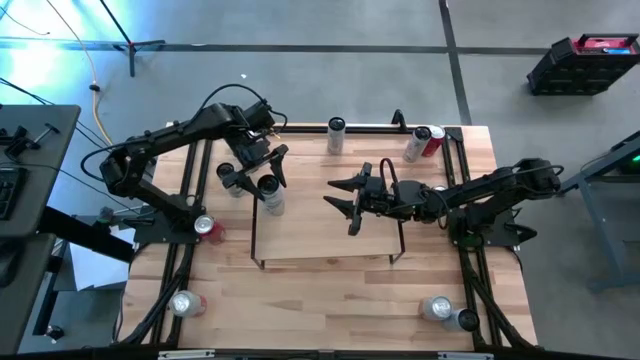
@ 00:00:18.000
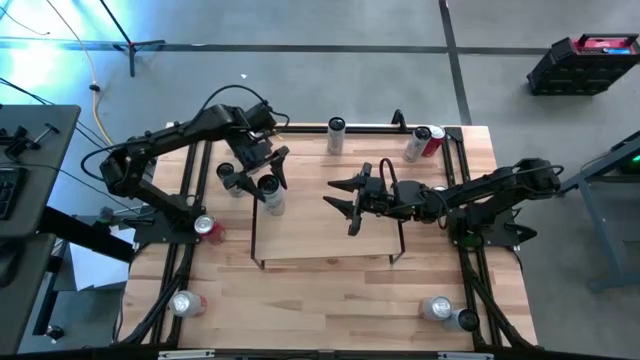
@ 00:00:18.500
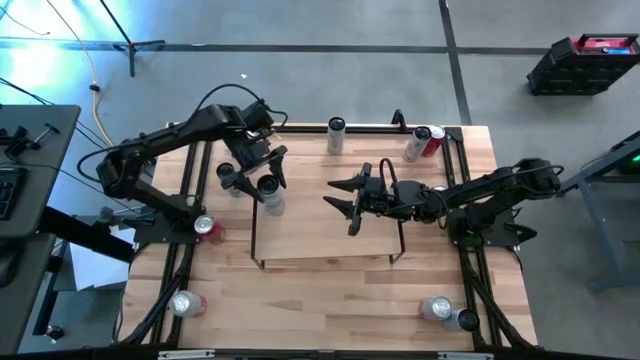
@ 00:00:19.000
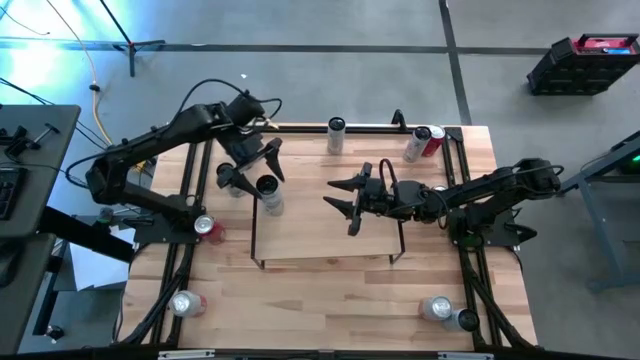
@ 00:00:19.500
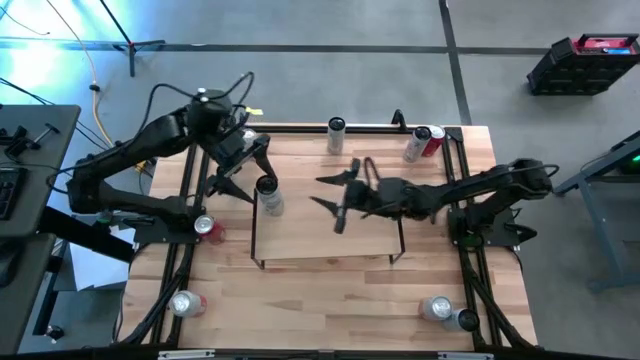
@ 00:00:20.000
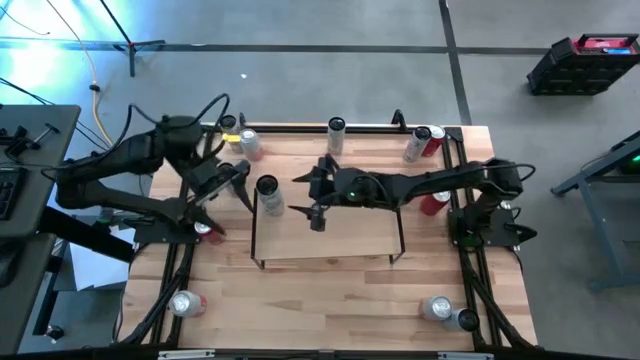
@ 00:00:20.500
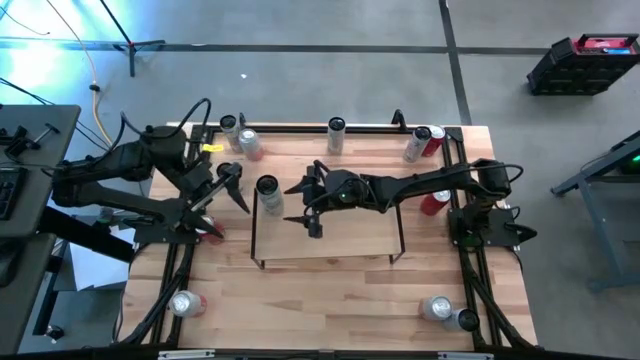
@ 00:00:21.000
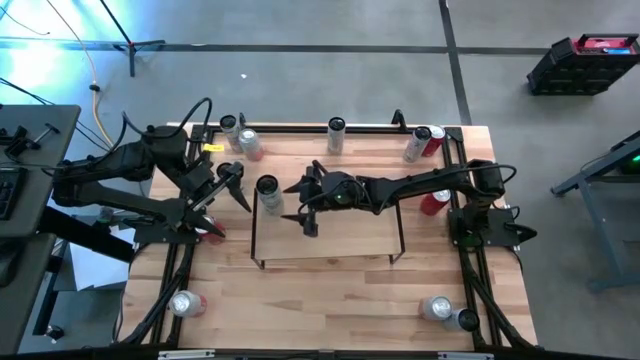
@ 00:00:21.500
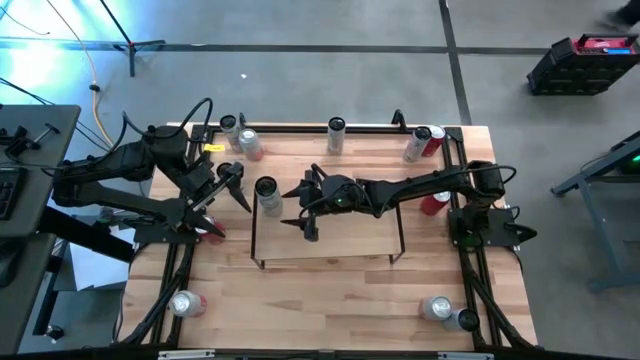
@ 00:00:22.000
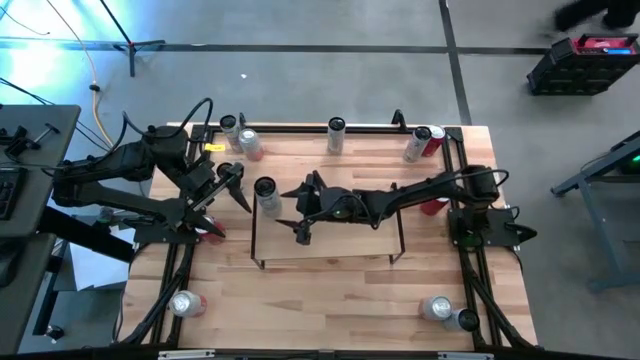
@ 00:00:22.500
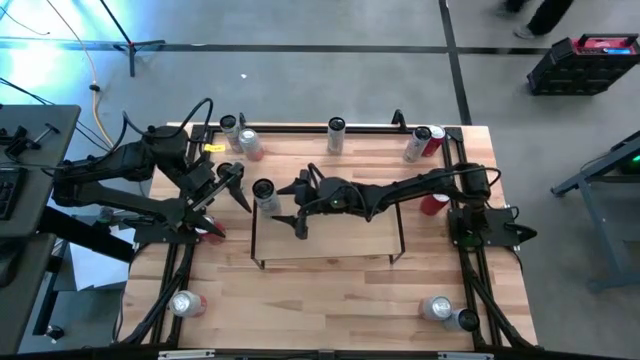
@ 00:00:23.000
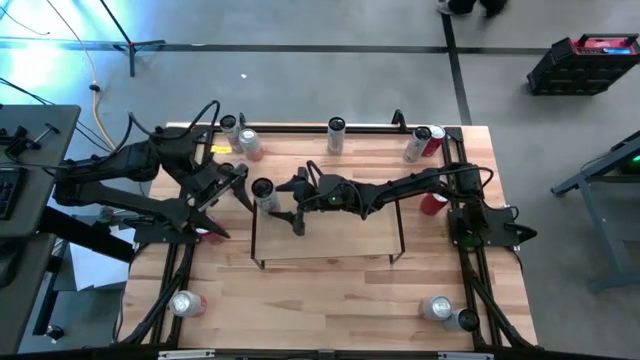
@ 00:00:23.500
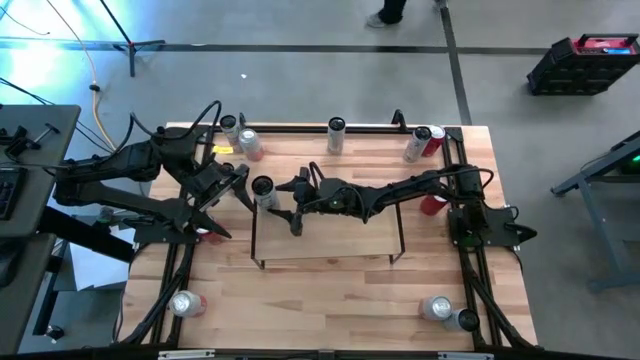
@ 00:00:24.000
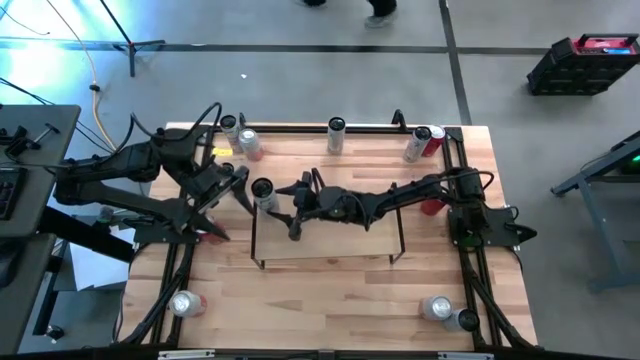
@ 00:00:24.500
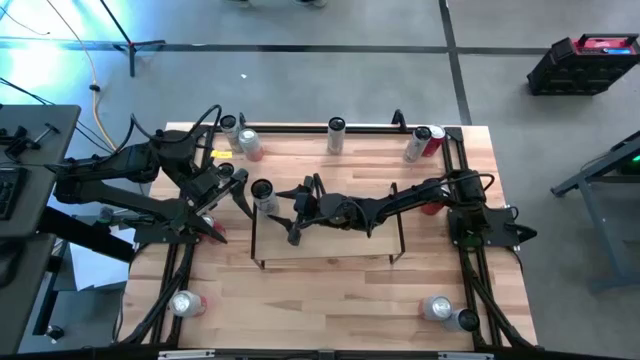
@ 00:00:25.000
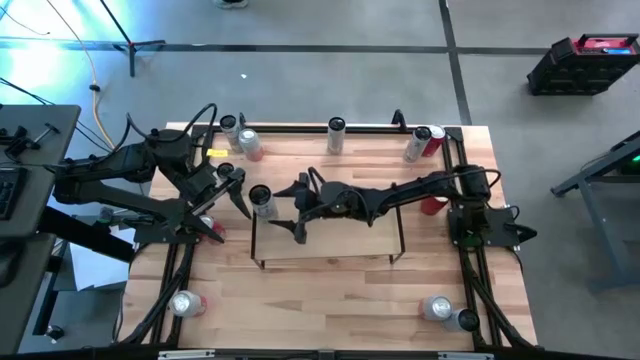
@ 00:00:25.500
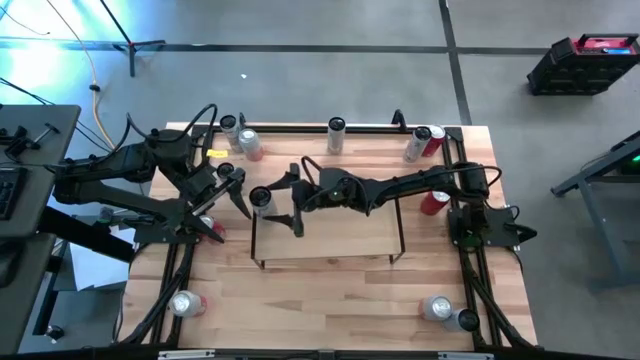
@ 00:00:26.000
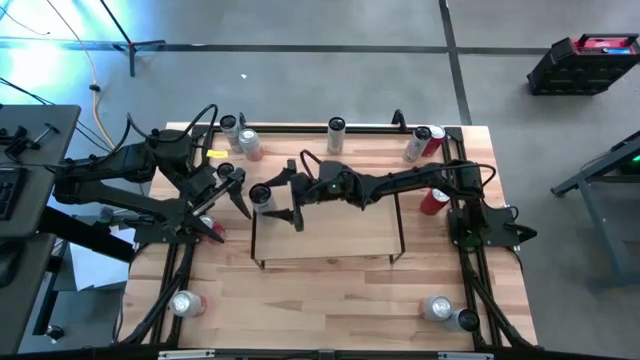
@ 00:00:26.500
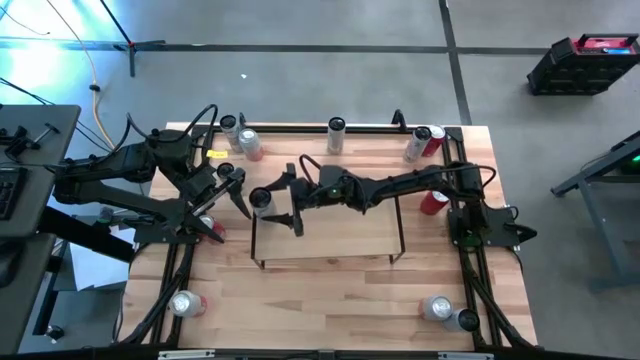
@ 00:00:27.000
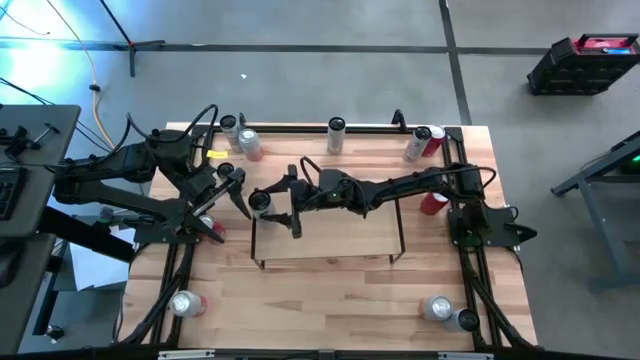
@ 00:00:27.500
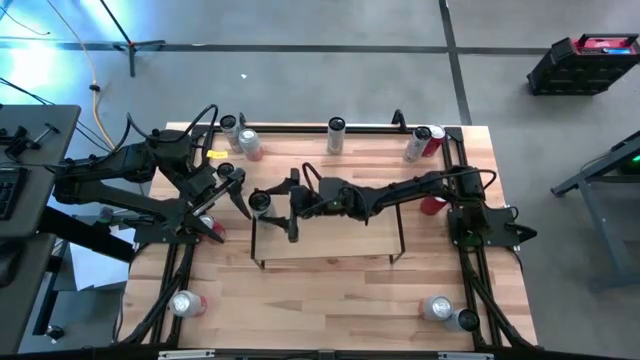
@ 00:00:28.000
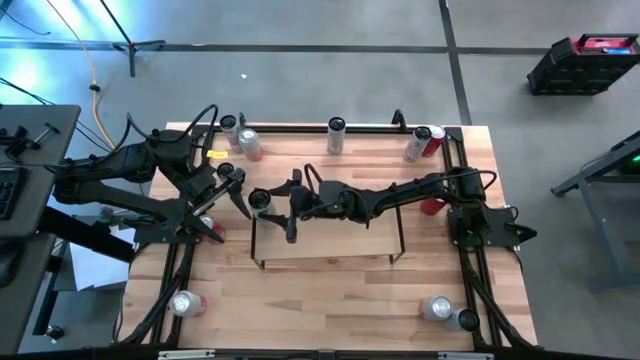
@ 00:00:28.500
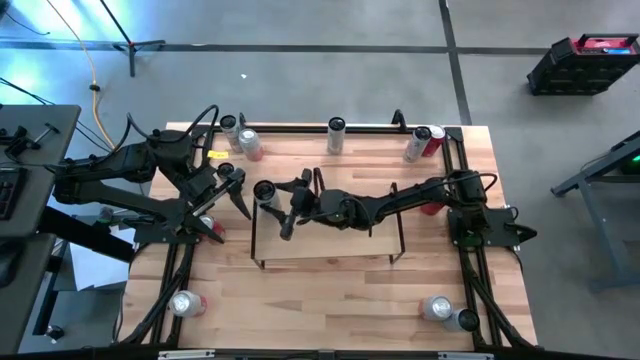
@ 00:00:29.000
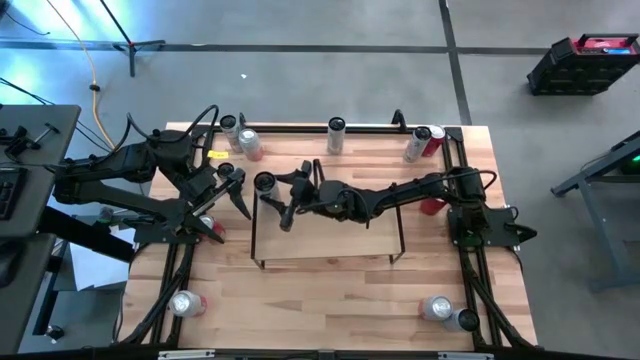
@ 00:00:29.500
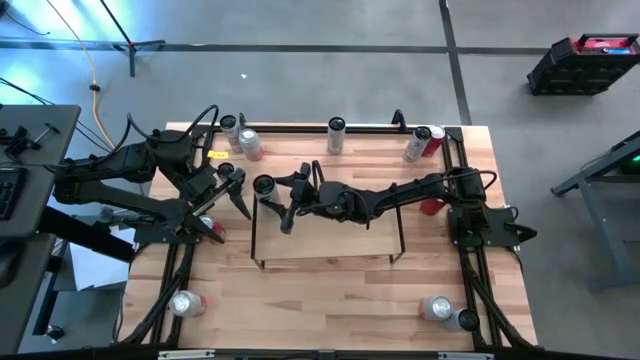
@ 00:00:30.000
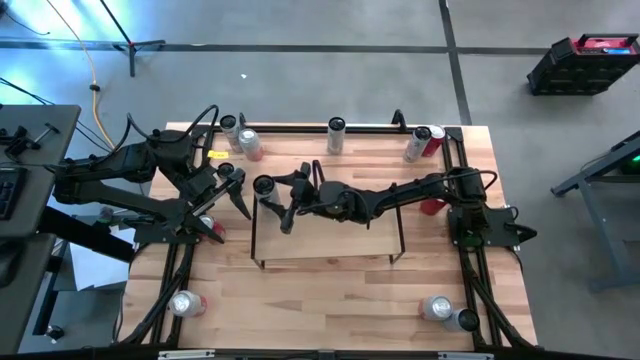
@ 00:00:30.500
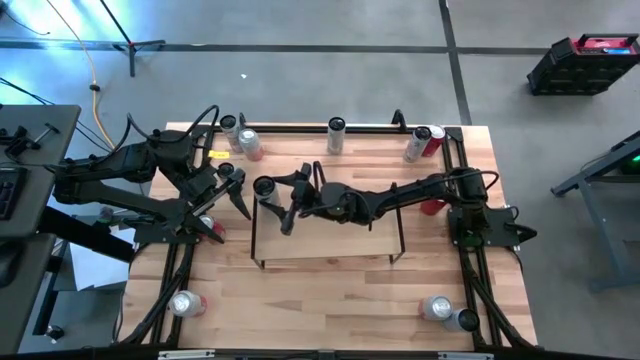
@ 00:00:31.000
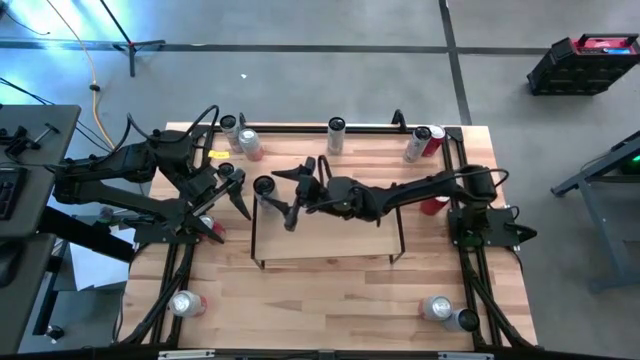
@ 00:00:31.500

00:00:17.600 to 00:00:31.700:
Task: Place canned beverage on shelf
Put the bottom left white blue soda can on the shelf

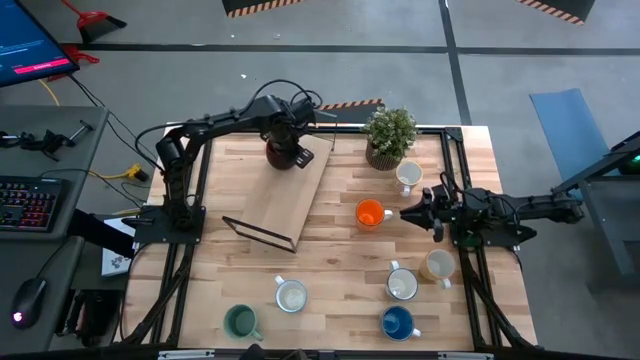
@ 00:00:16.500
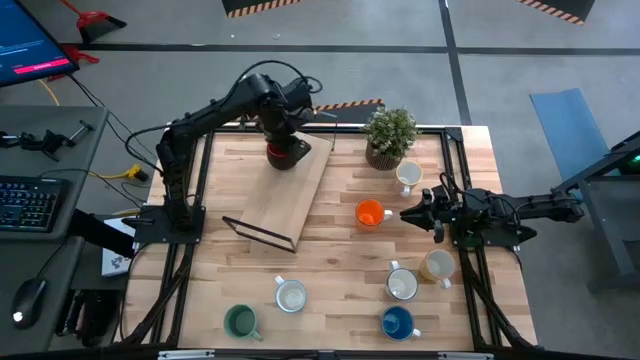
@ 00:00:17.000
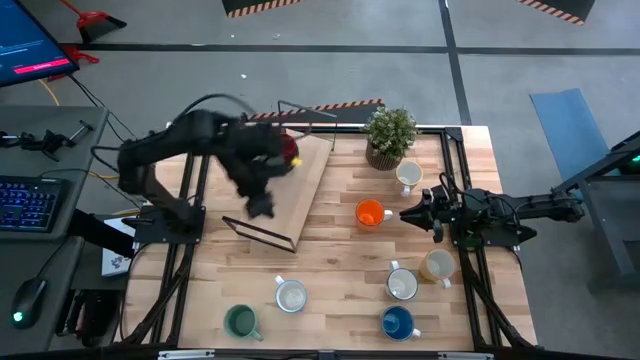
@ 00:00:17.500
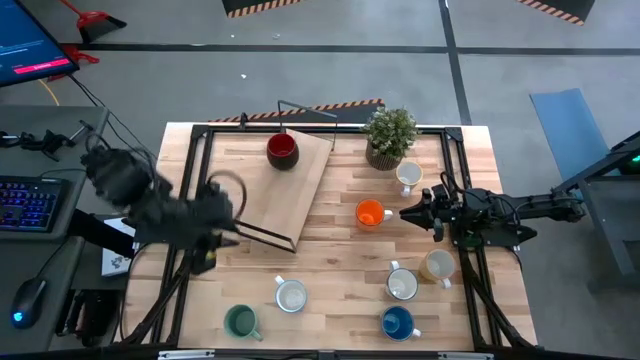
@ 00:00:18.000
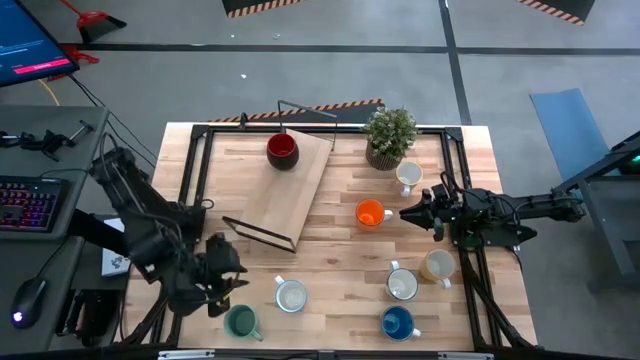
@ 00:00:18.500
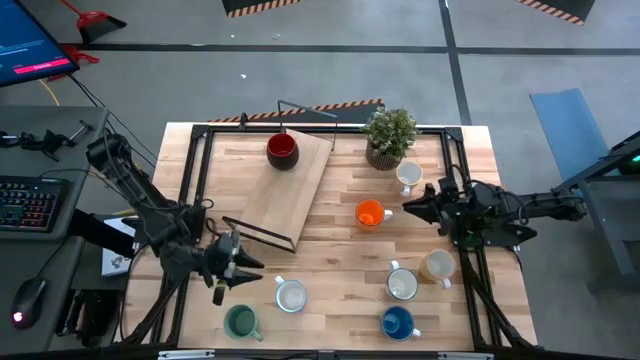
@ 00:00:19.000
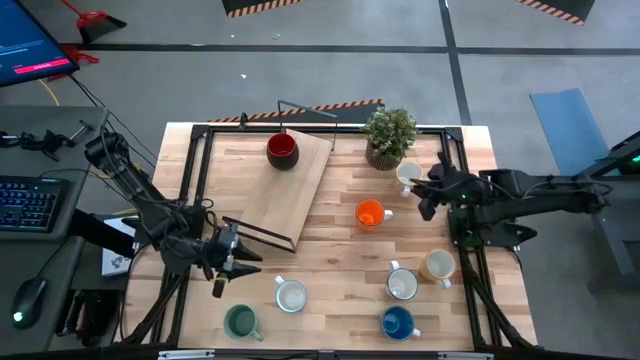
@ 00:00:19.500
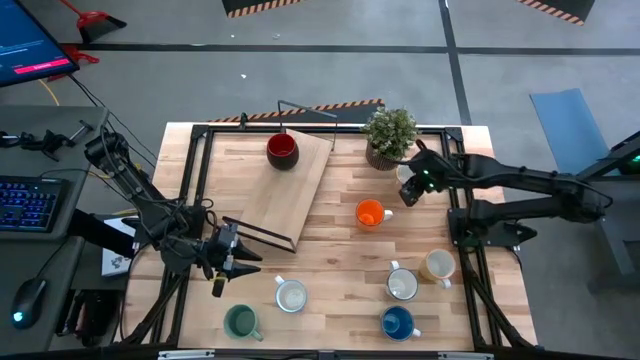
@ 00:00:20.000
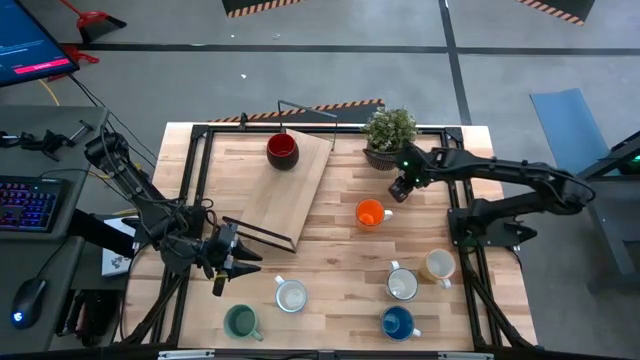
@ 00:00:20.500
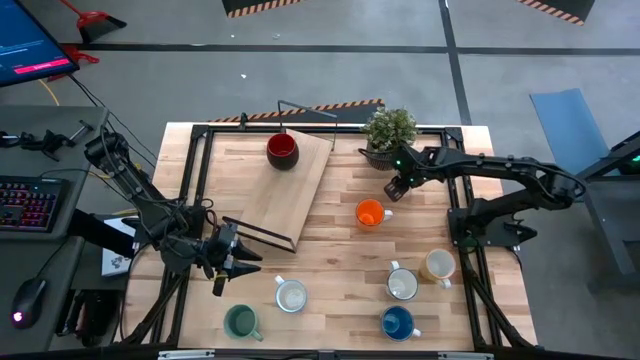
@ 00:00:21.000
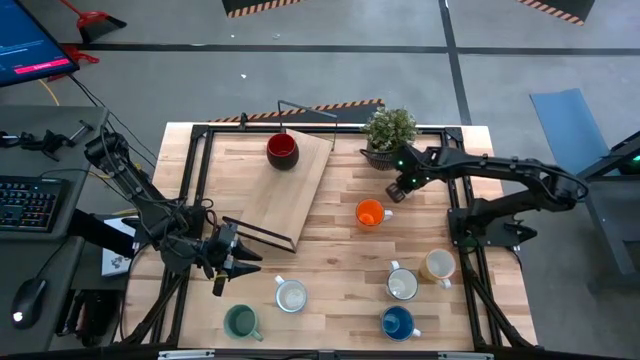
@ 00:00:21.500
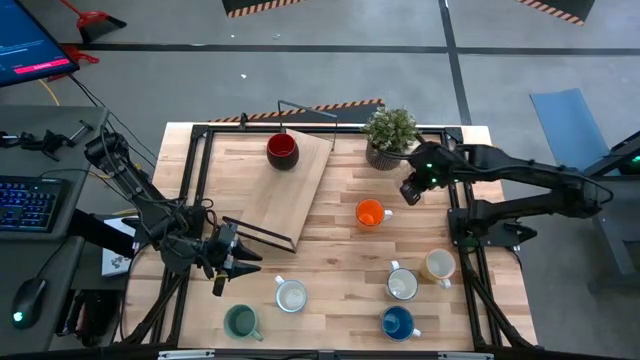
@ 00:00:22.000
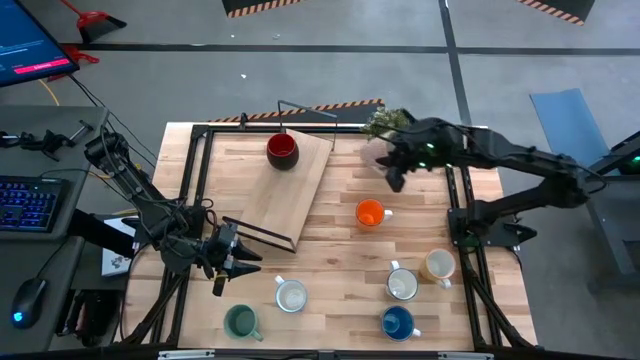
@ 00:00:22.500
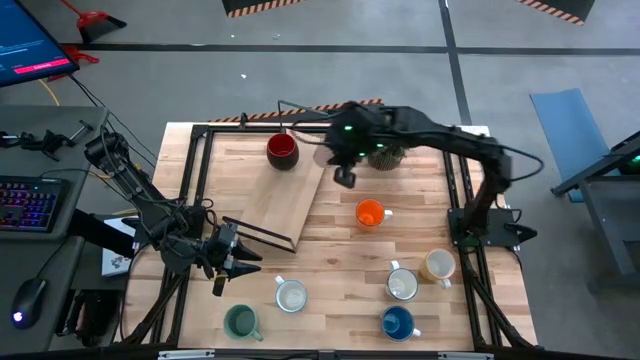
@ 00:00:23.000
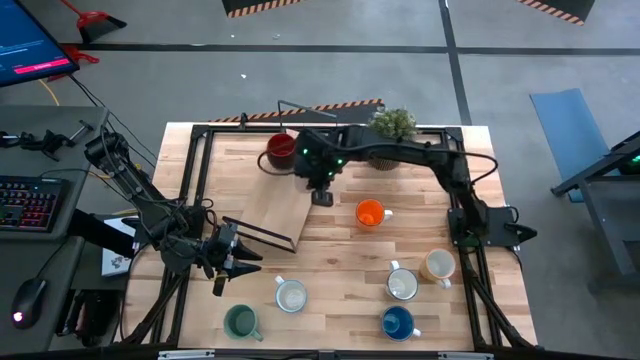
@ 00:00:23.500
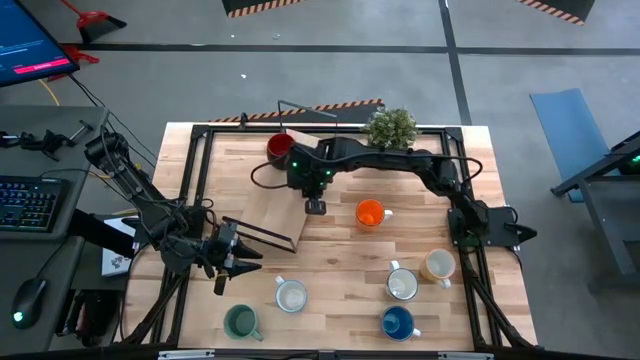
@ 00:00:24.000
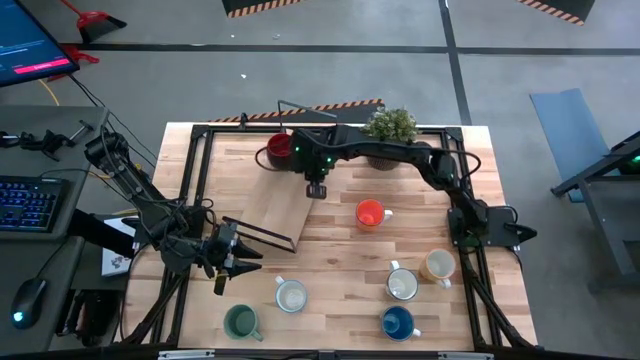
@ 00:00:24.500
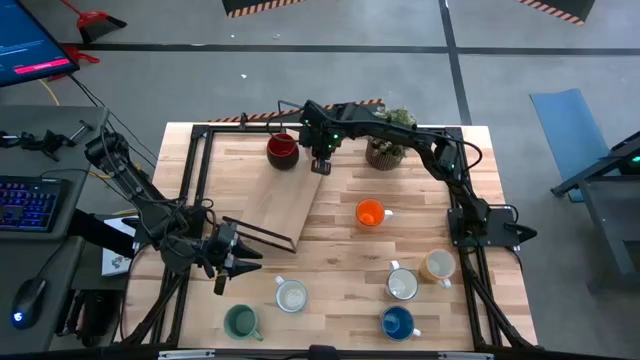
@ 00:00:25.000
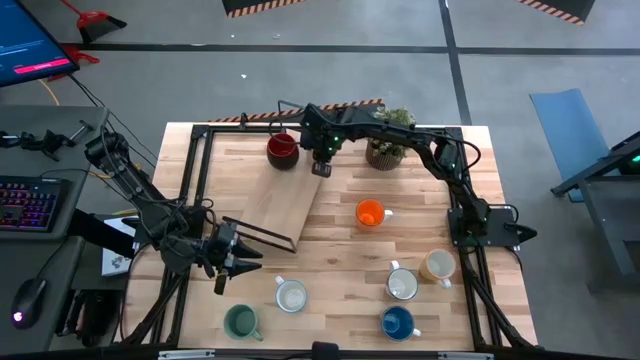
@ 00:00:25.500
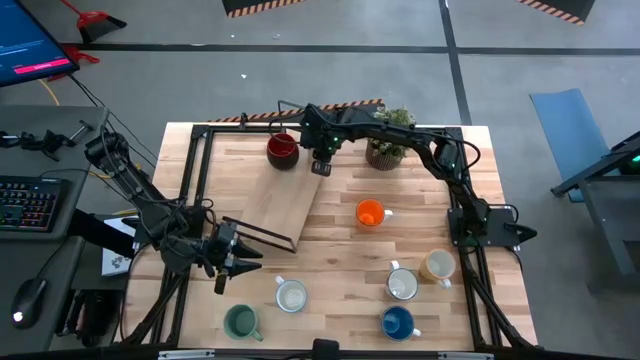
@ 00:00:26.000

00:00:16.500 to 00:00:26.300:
Task: Place coffee mugs
Put the yellow cup on the shelf
